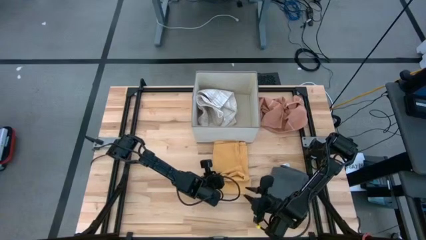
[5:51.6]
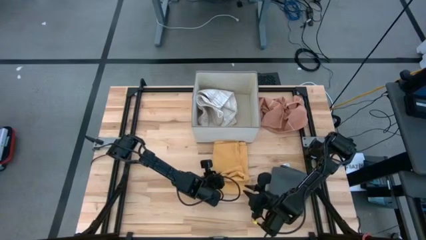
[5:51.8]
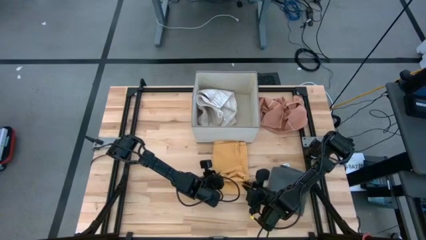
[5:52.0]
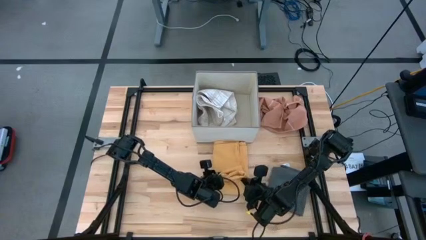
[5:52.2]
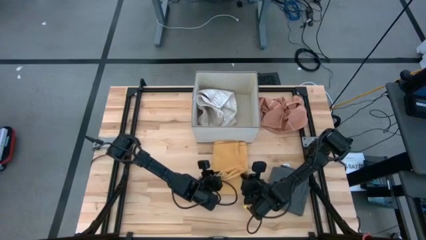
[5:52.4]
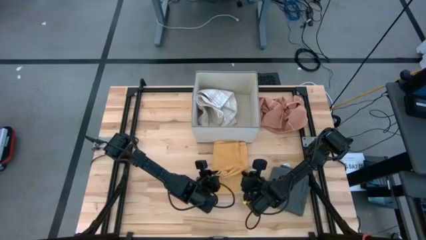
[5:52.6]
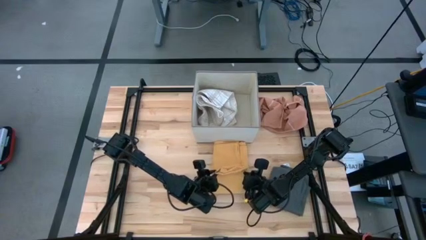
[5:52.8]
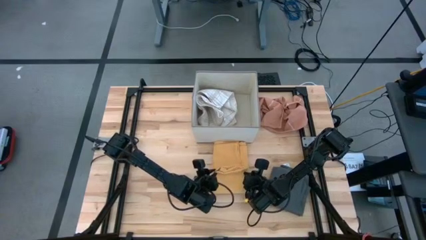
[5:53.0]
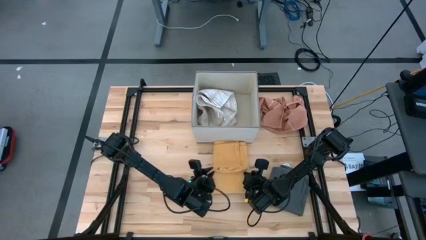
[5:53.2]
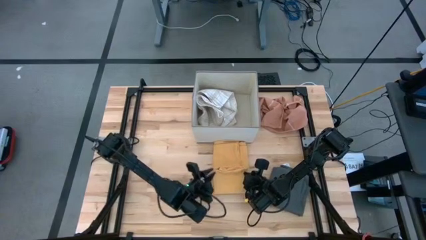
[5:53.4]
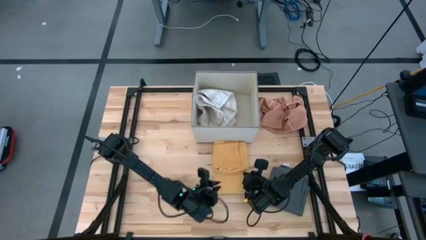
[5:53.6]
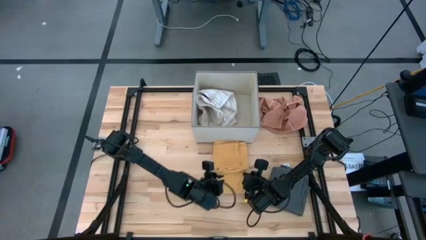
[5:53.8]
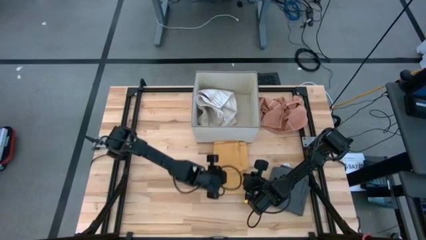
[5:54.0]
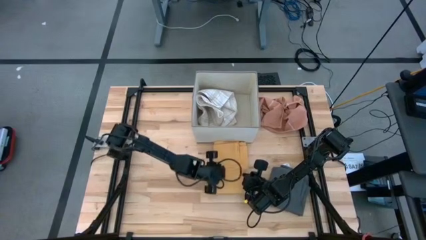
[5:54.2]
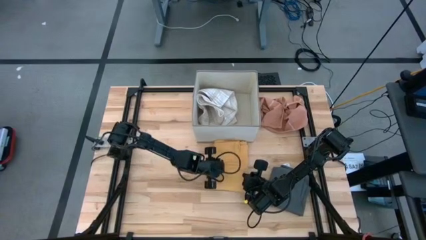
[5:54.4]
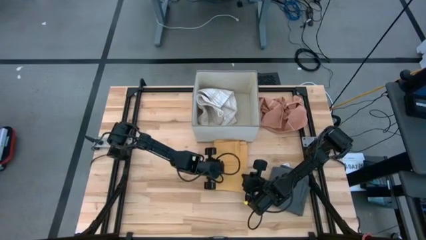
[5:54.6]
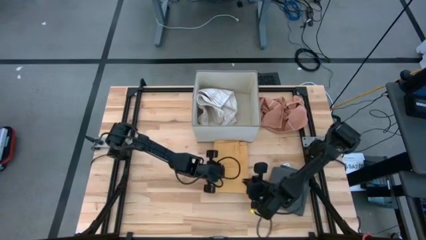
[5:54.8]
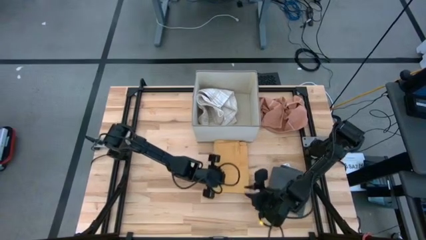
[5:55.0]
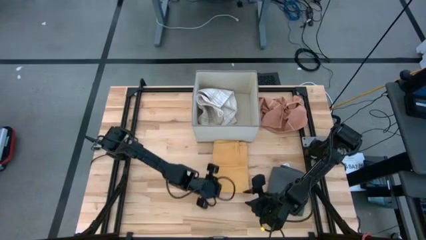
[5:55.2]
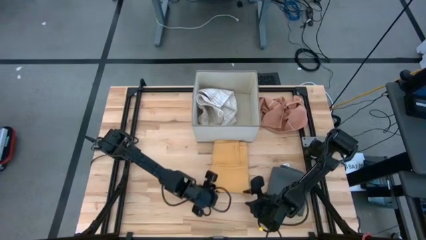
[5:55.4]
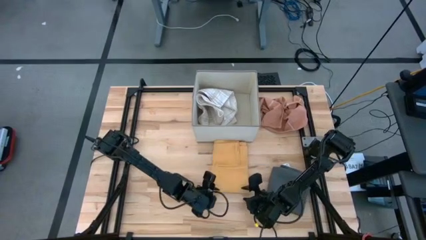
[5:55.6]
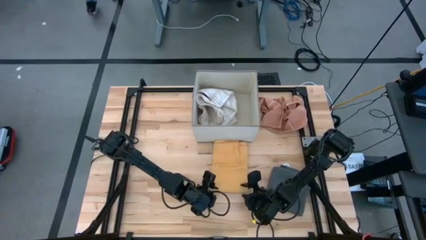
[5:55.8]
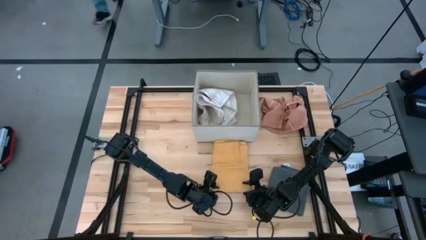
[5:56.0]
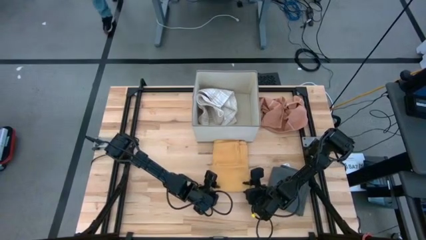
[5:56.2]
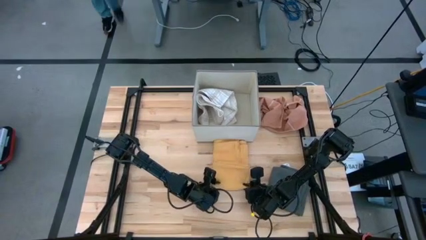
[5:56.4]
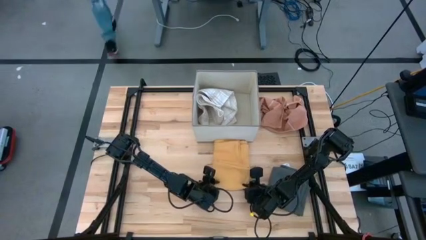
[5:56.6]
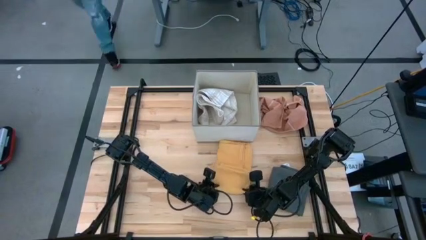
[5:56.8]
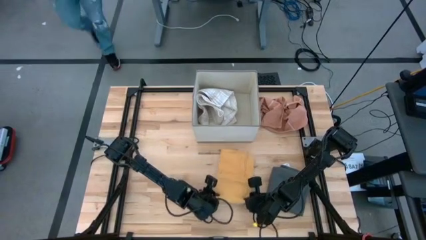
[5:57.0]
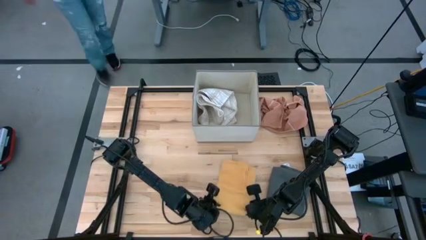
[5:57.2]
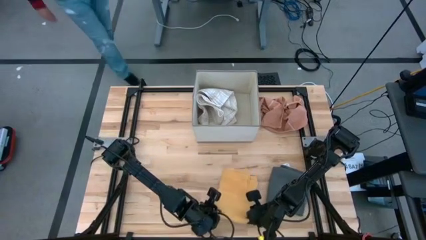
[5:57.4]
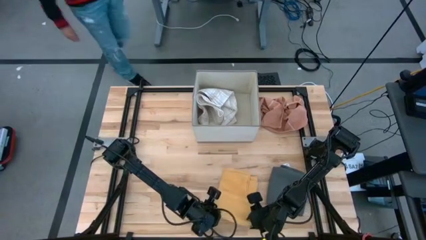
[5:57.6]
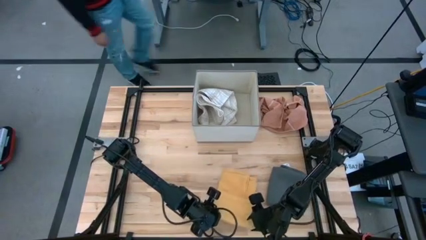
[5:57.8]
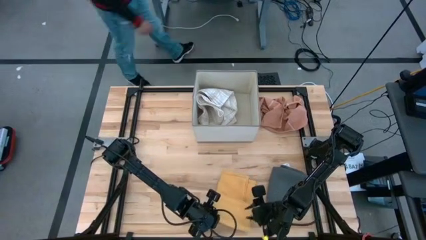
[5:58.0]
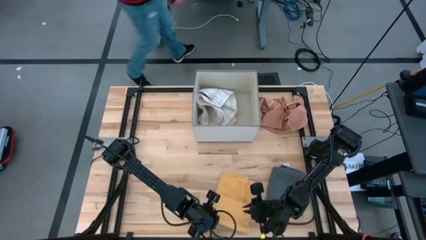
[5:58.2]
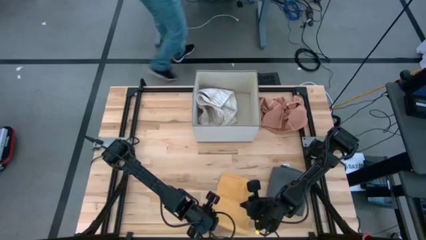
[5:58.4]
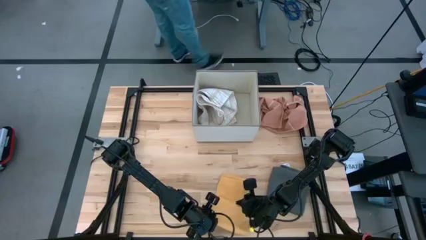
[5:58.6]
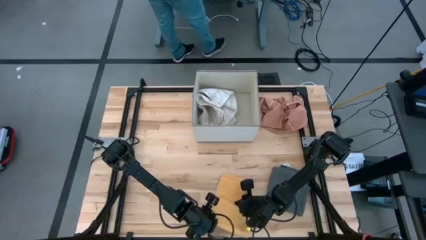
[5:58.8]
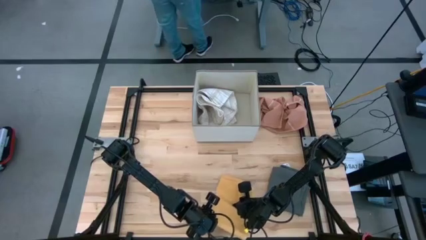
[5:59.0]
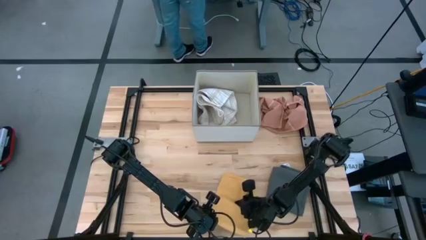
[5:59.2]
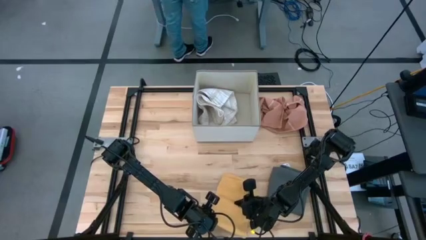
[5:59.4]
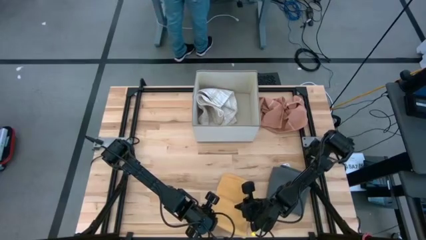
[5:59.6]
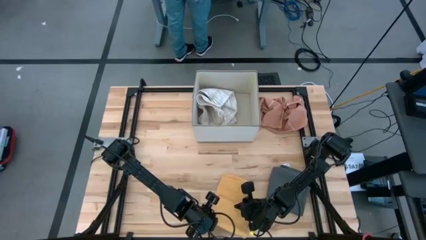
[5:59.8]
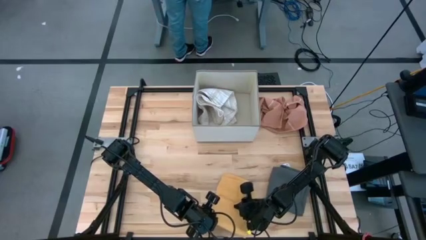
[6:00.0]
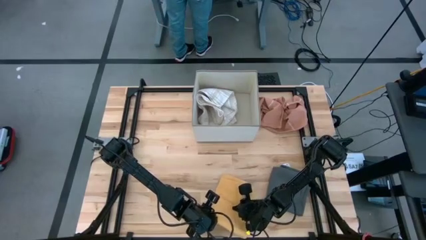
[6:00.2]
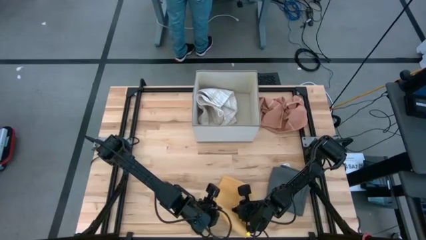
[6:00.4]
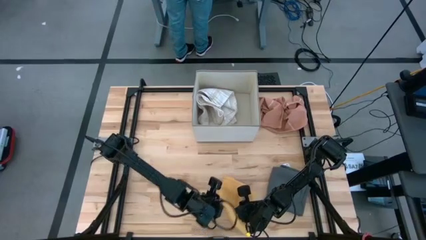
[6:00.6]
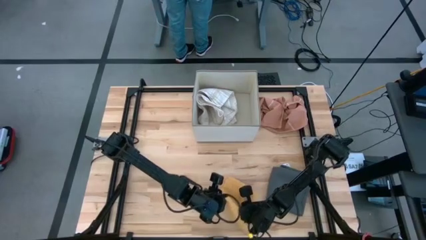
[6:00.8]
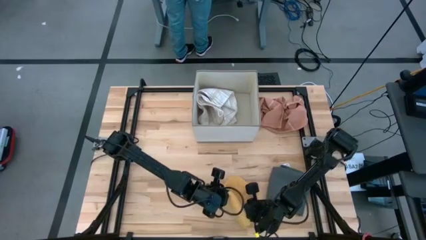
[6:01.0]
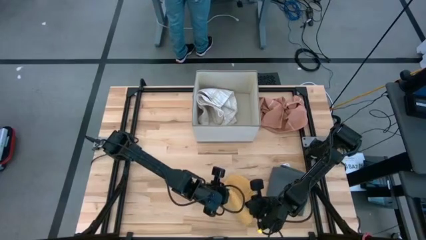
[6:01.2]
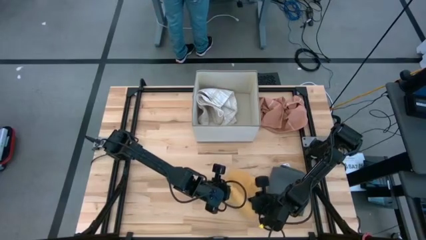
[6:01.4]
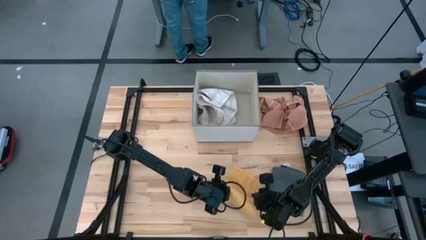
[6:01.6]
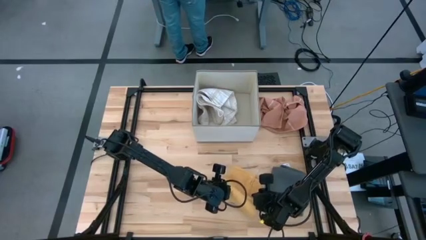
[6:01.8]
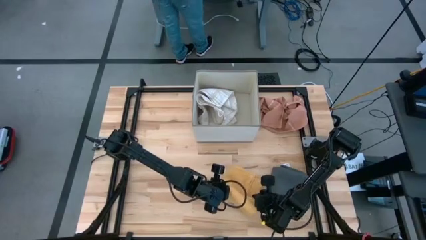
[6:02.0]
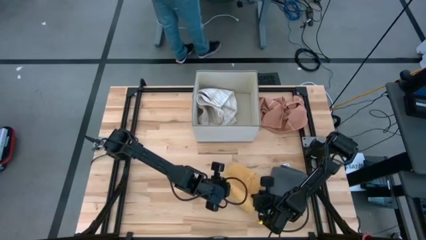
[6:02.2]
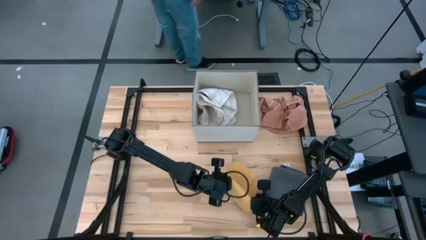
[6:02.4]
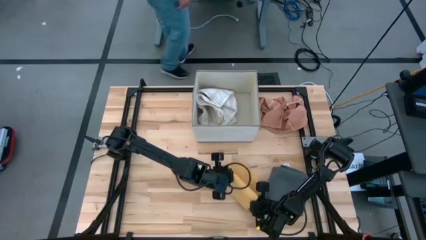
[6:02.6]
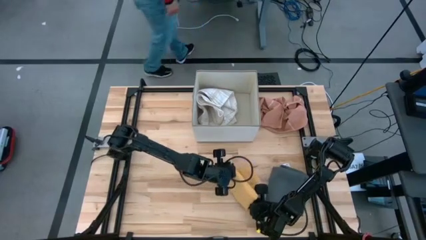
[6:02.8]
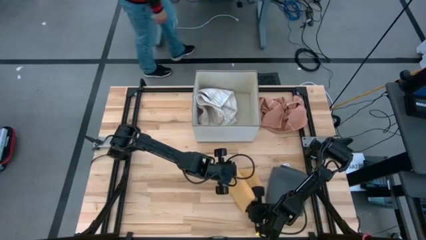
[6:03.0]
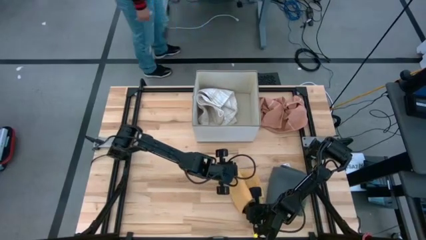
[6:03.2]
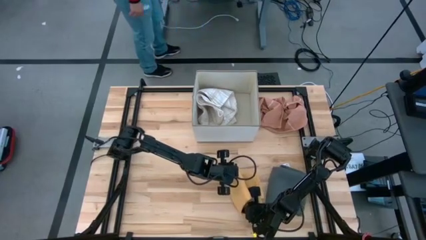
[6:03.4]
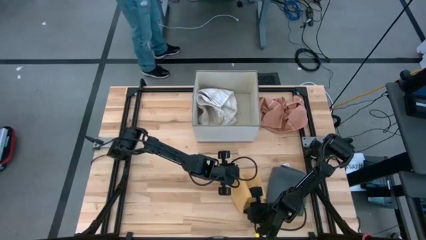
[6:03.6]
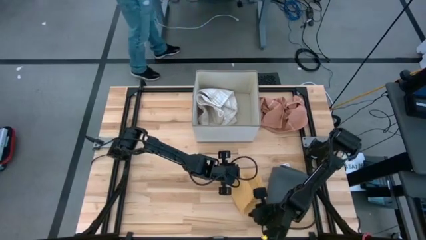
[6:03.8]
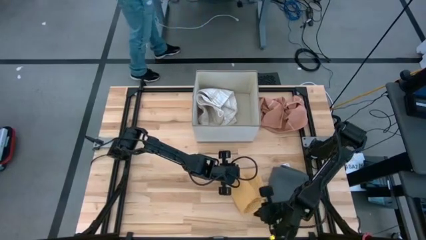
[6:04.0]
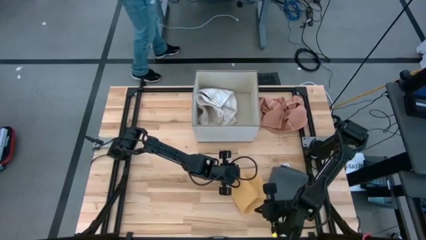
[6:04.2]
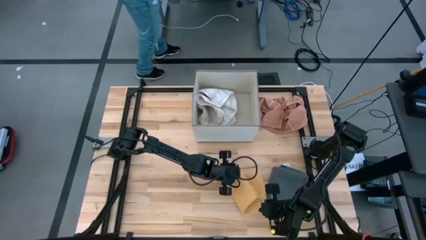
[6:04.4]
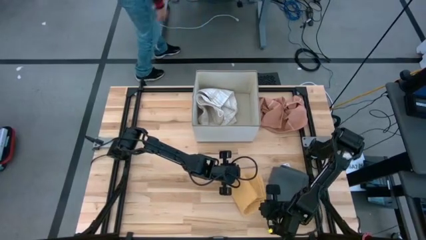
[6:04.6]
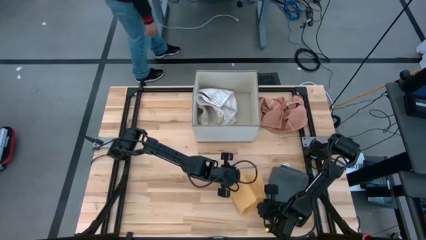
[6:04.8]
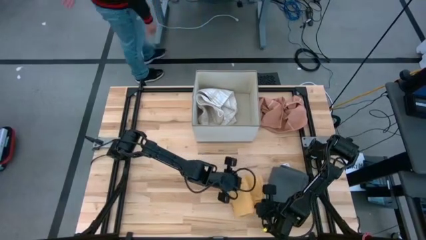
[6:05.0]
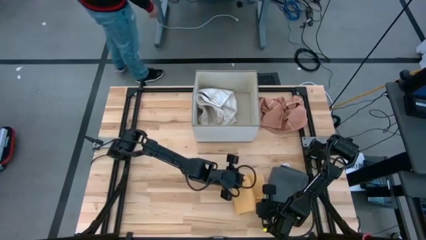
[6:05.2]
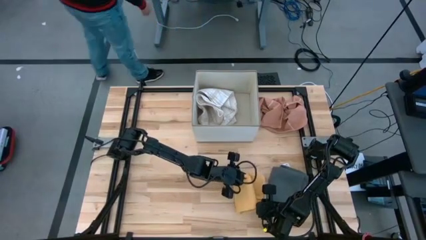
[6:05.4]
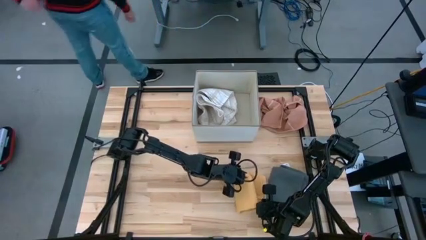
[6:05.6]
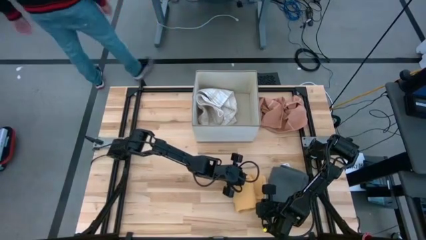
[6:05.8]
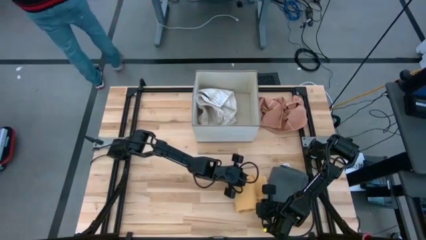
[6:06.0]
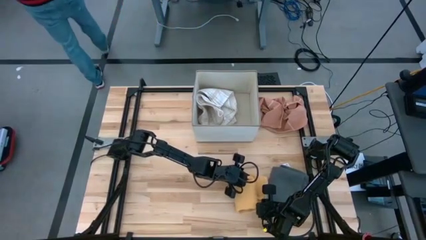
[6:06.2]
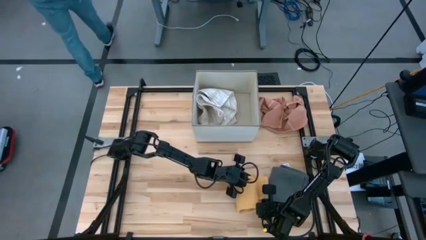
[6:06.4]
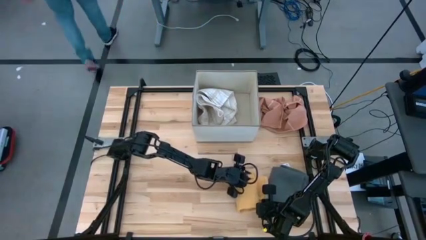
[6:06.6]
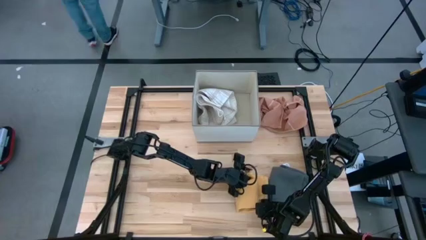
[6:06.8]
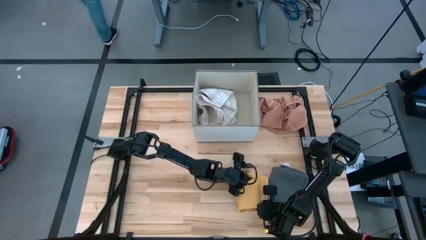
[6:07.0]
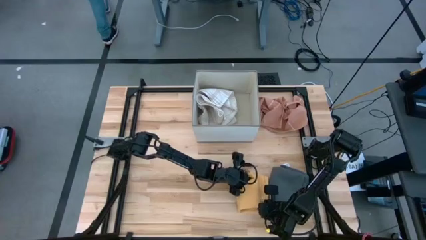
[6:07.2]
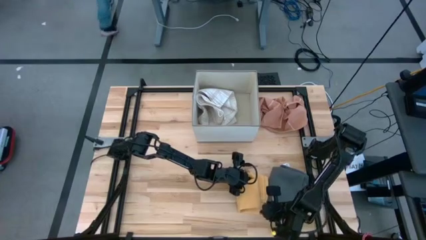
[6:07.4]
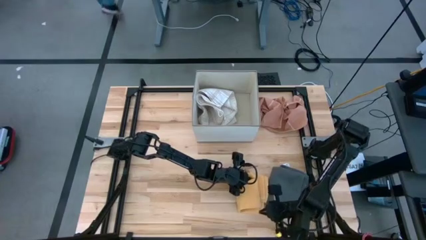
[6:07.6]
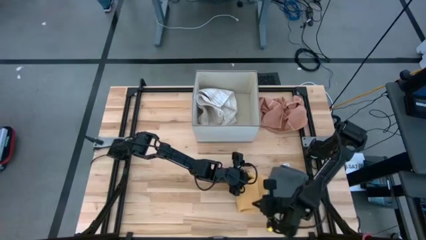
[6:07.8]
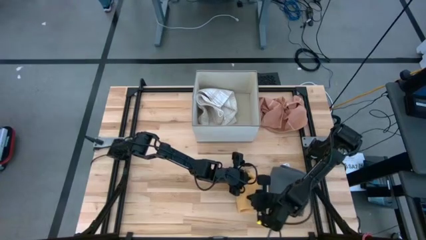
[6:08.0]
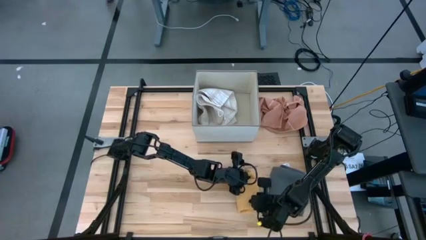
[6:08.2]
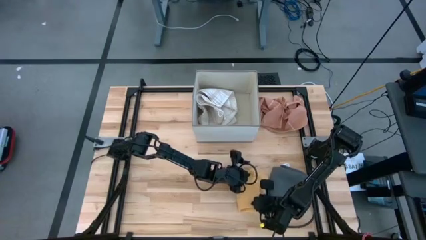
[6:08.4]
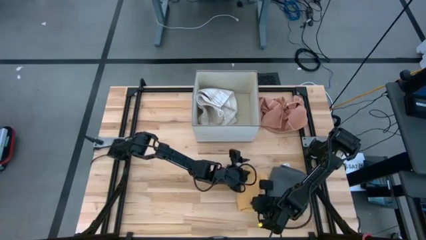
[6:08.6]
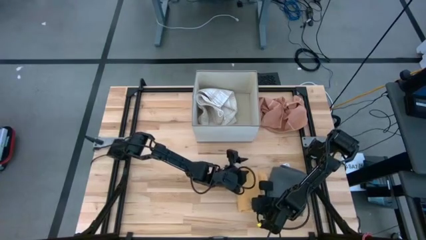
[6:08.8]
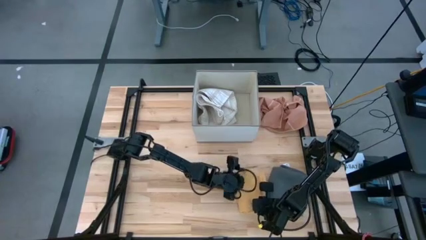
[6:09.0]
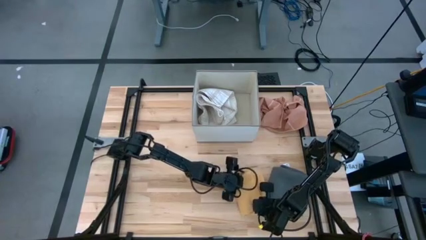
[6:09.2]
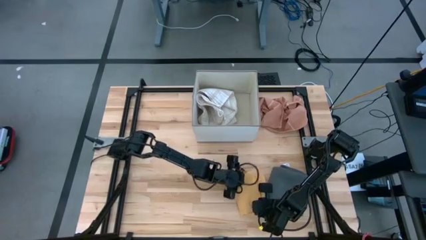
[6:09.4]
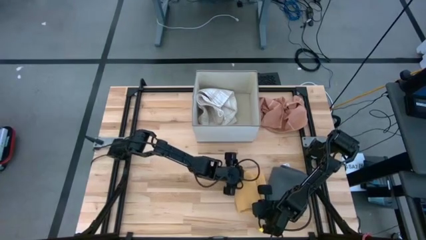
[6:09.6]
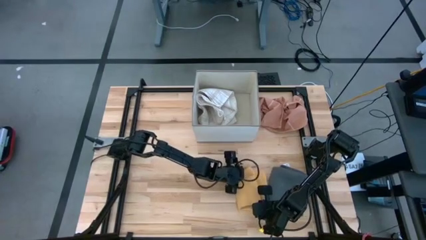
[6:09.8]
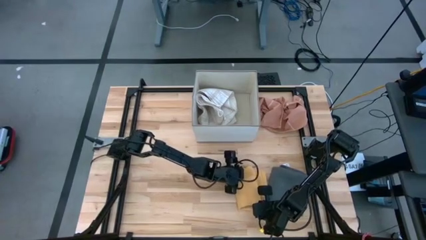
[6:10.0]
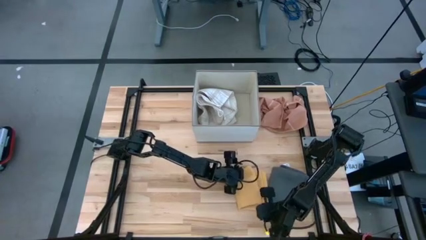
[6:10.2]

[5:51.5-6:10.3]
Task: Fold towel
Fold the yellow towel
